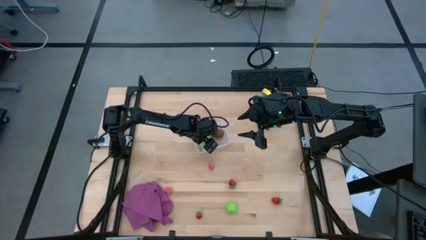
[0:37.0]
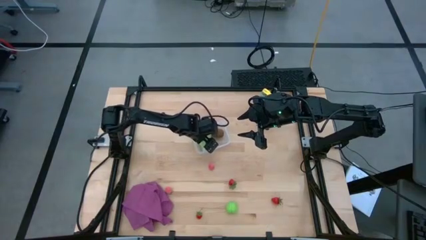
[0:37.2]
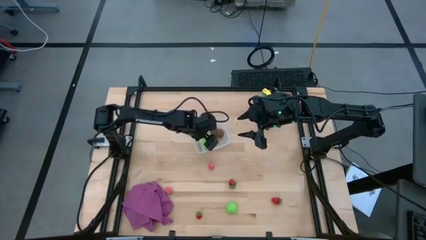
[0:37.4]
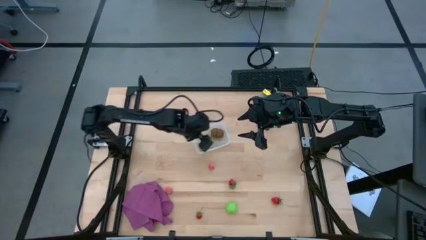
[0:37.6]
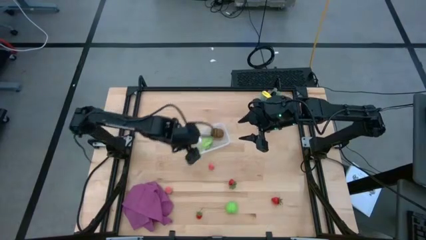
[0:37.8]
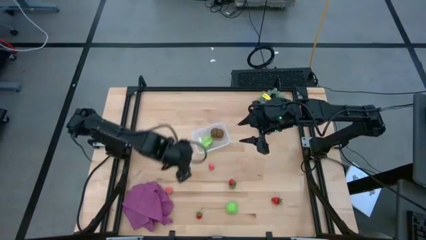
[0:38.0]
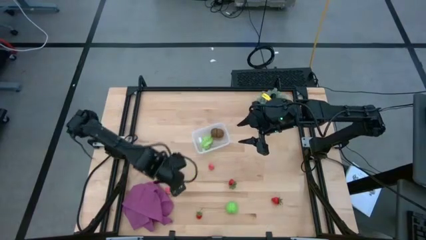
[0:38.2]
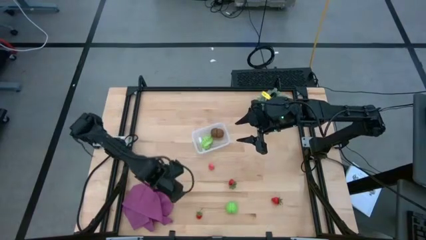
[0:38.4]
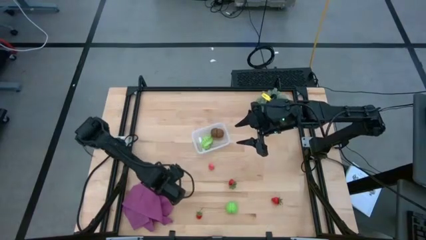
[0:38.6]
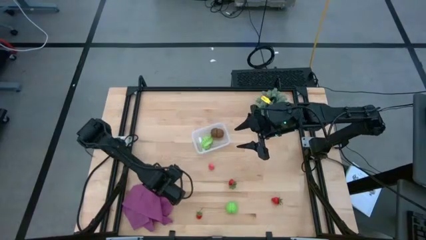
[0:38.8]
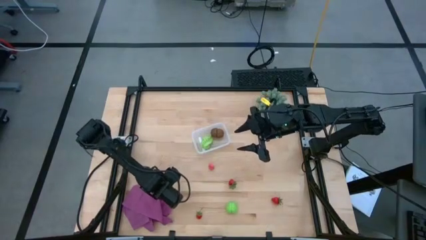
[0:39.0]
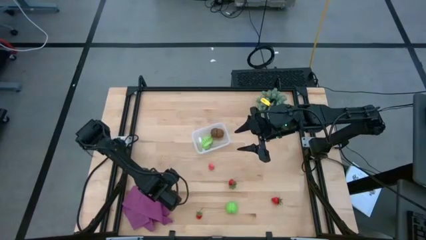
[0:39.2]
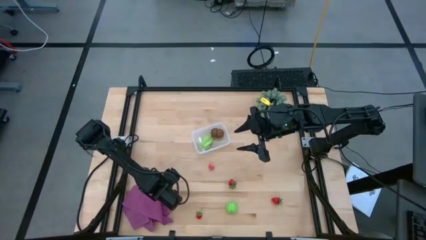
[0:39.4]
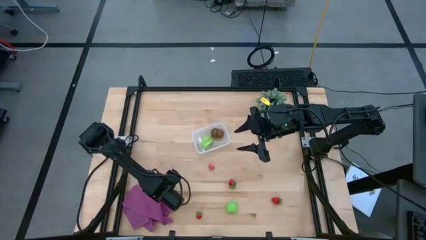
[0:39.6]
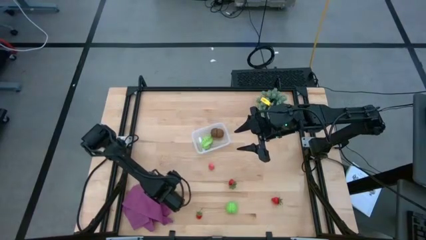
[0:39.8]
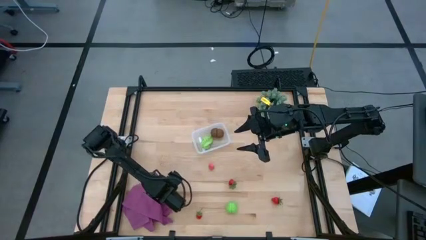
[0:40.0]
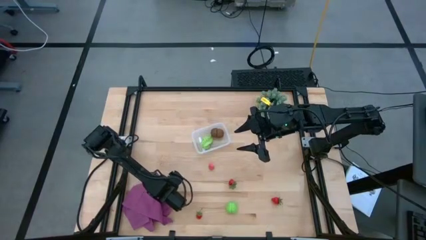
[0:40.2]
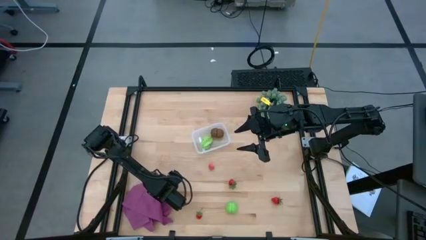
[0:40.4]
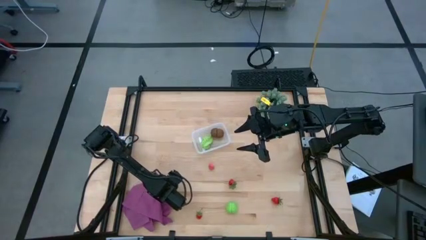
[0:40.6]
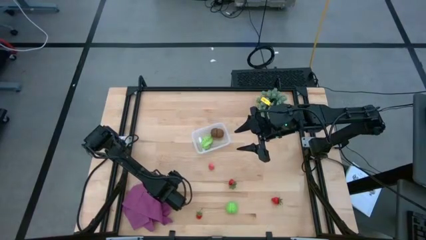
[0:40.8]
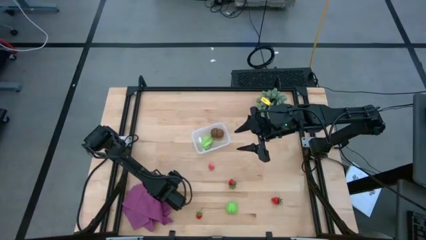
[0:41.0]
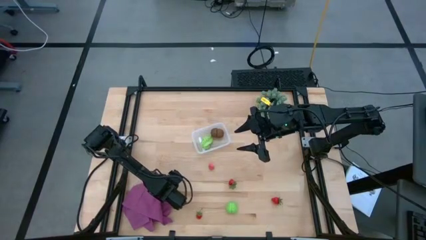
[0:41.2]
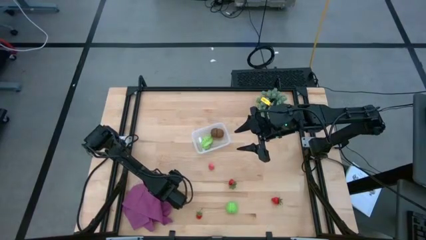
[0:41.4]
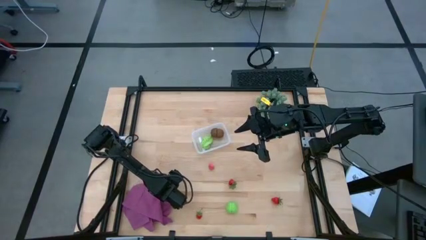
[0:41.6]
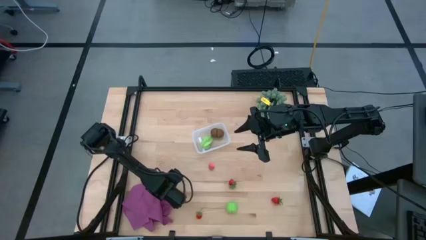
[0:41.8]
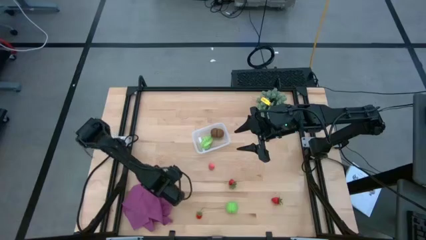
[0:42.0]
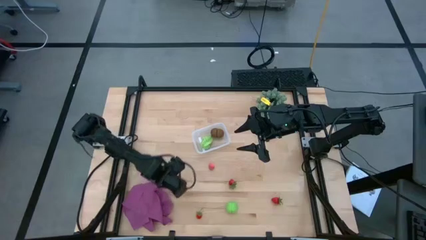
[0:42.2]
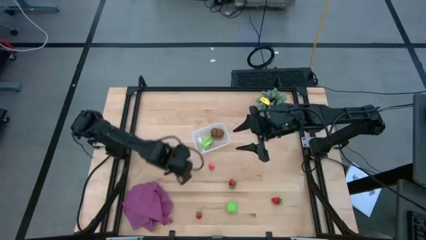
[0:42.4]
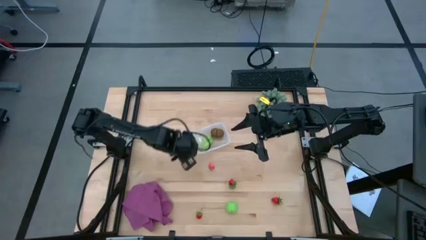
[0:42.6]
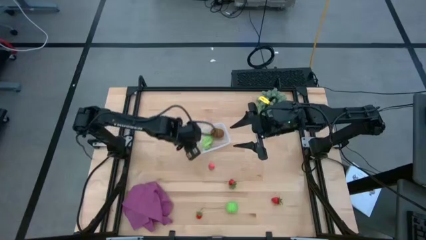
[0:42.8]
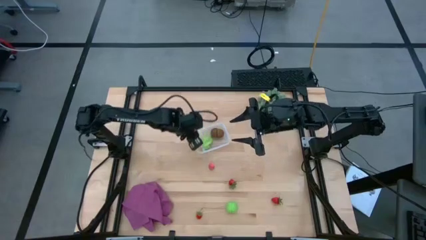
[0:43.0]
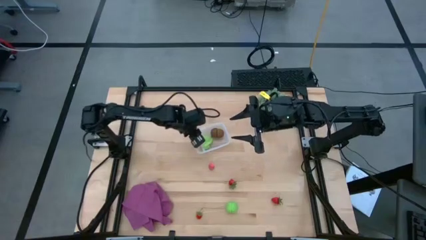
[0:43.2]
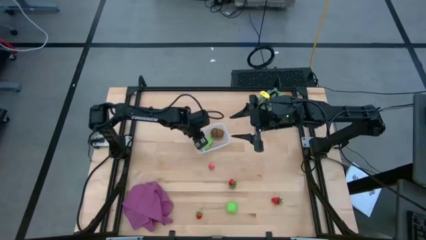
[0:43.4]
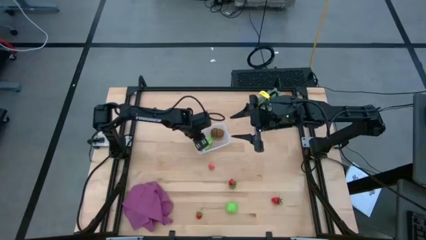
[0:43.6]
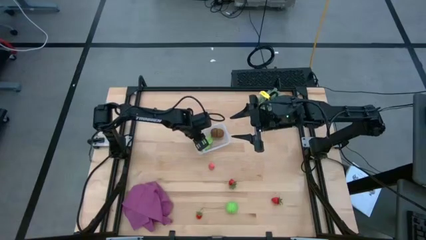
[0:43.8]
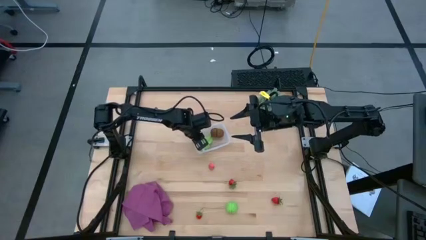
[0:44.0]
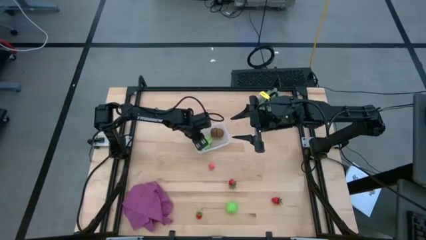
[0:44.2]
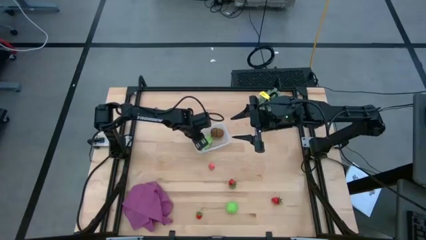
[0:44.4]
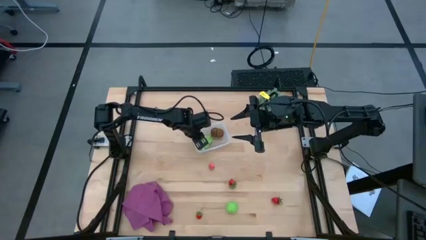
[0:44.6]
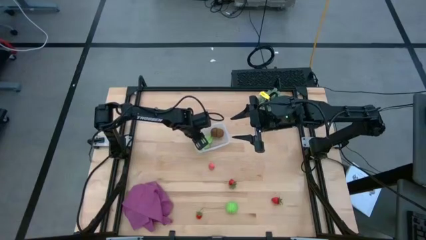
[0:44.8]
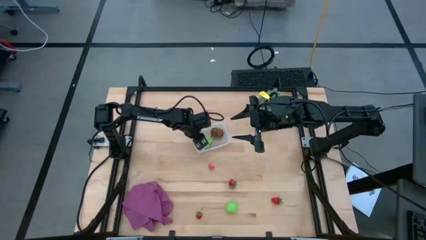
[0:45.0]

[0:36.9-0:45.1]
Task: Pick and placing Produce into tupperware
Put the left pink peach into the transparent container

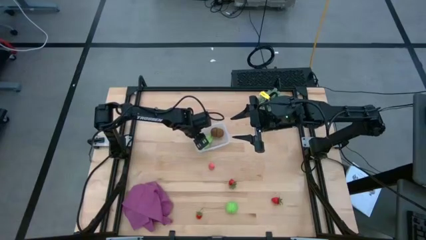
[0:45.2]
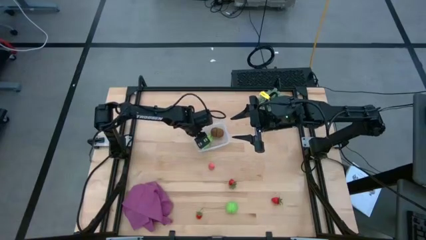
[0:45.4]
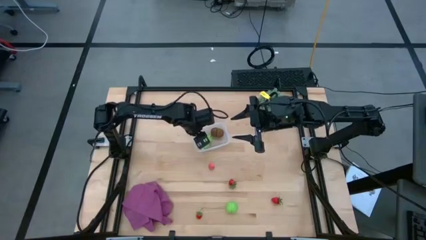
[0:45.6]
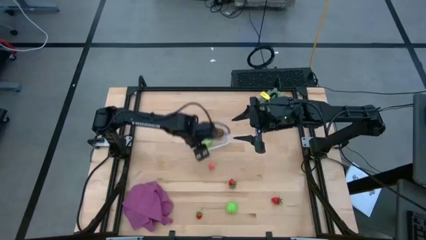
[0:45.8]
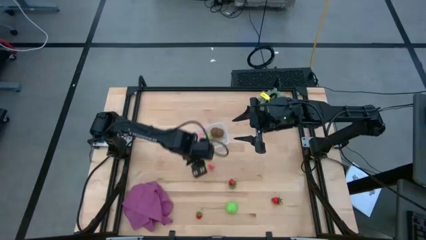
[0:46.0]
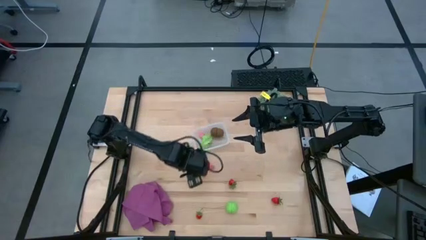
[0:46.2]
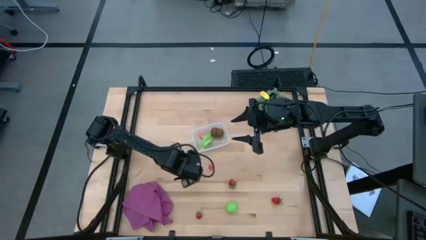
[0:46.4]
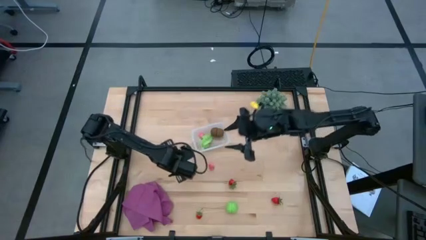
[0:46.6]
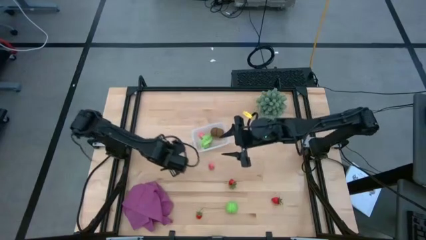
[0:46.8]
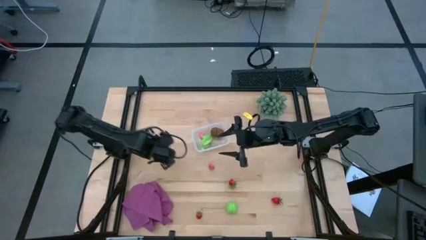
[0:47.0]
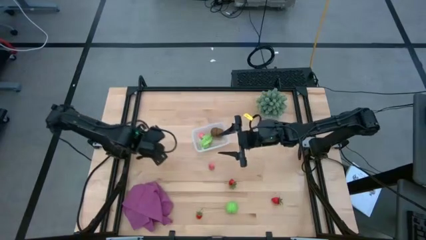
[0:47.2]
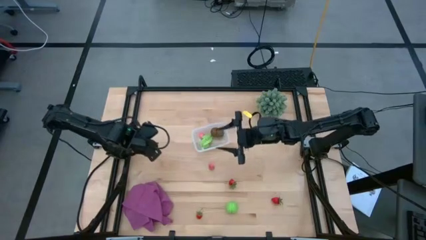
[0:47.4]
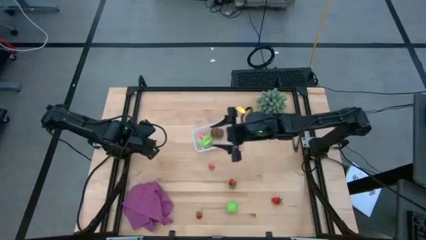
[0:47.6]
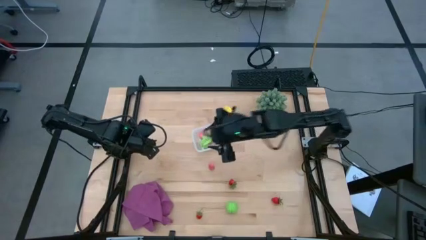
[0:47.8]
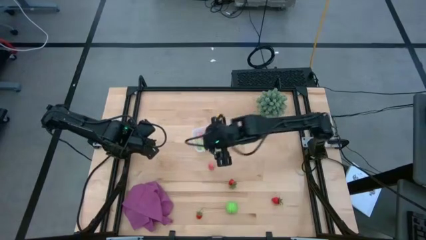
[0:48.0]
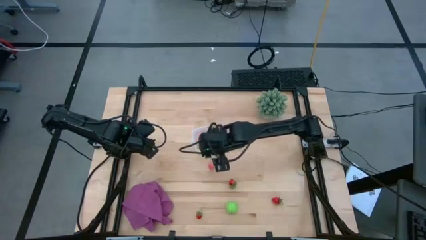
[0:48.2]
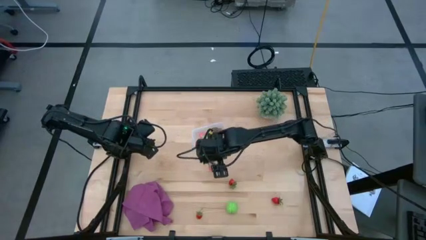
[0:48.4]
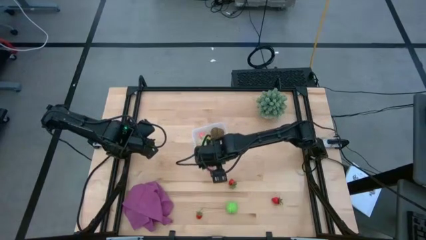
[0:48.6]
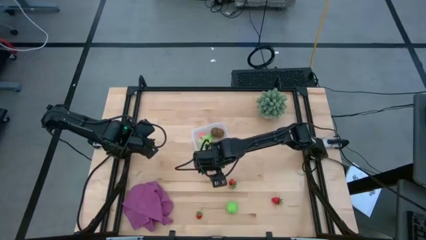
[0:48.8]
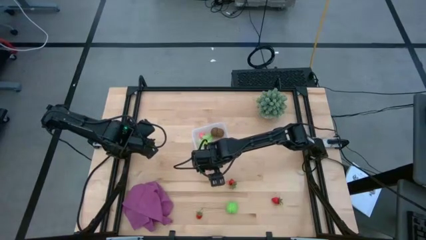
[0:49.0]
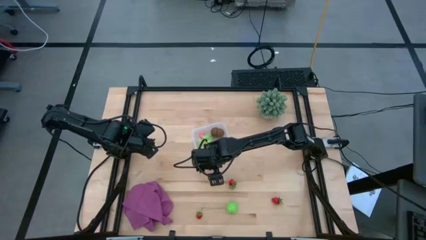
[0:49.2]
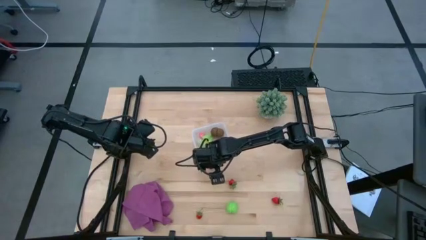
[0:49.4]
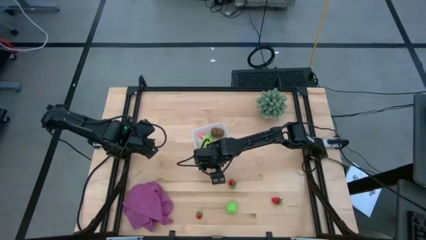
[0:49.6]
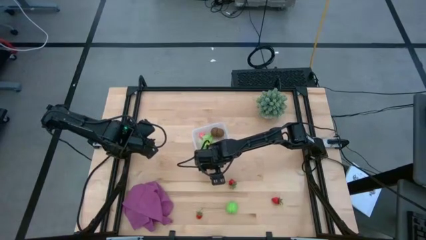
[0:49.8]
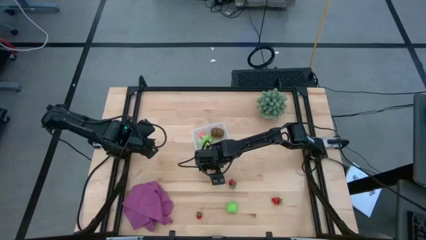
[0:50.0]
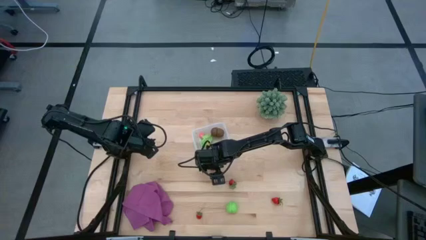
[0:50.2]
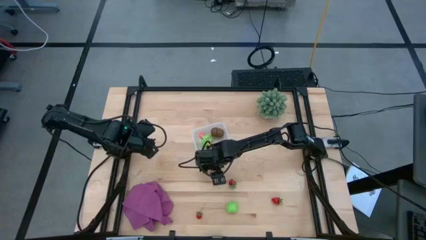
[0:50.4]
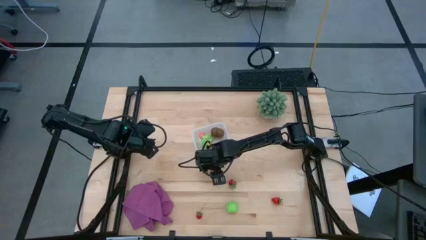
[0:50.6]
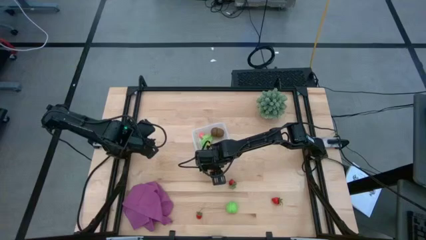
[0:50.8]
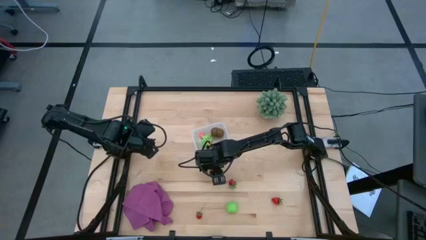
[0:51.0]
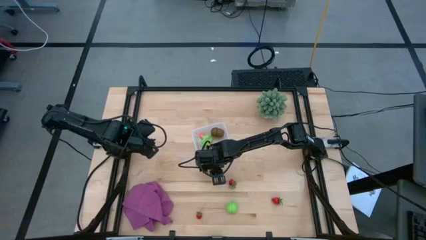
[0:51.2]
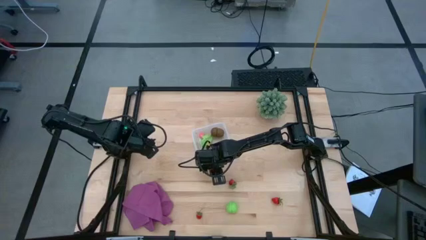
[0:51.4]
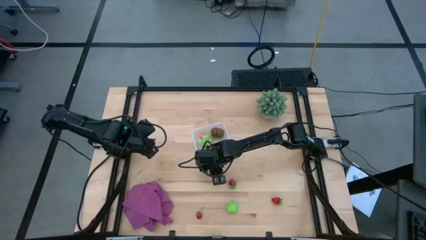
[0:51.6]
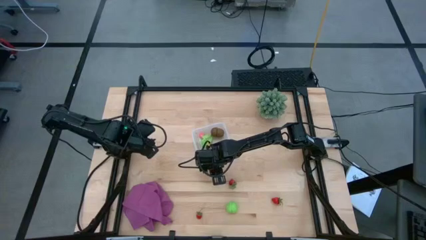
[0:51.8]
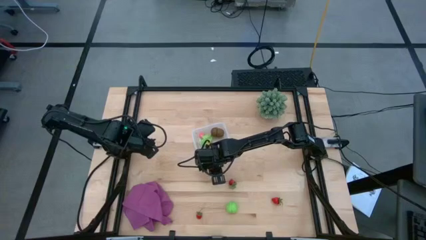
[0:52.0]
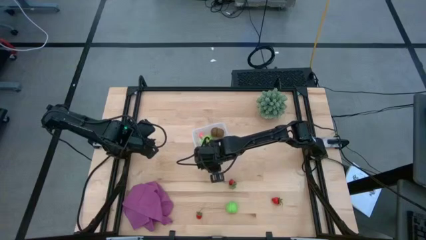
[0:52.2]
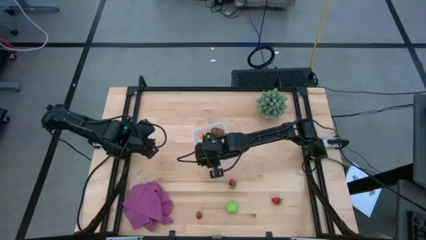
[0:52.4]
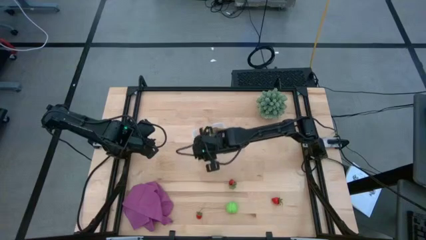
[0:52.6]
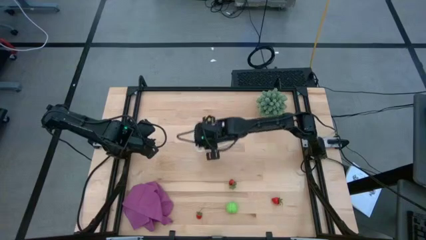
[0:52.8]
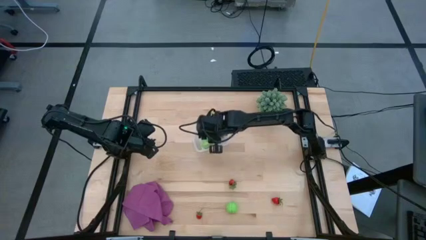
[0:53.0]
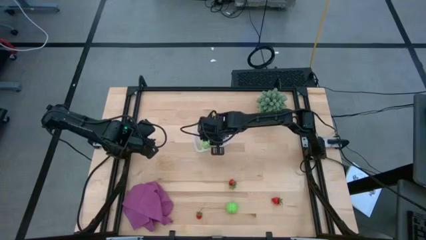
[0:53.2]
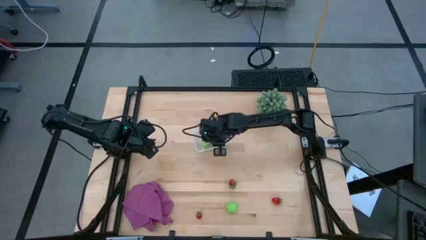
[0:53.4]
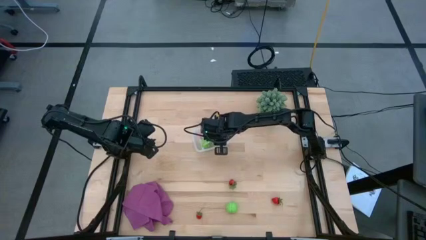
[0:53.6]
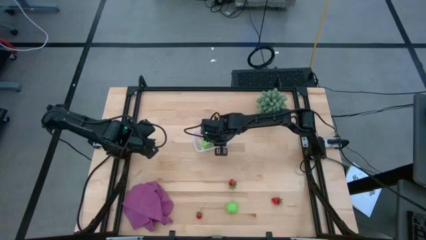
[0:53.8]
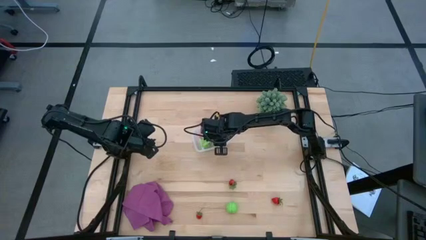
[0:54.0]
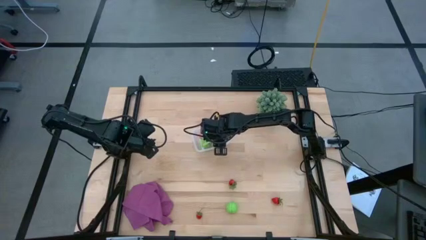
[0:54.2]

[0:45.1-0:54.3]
Put the pink peach into the transparent container
